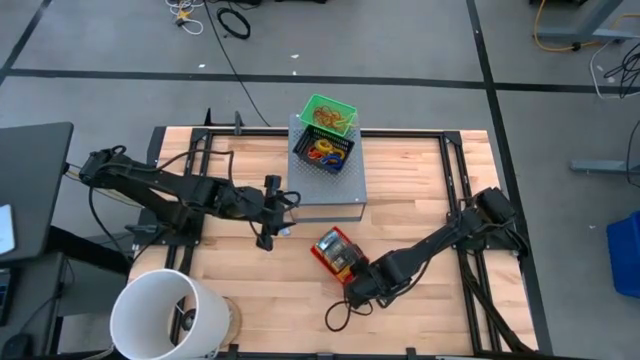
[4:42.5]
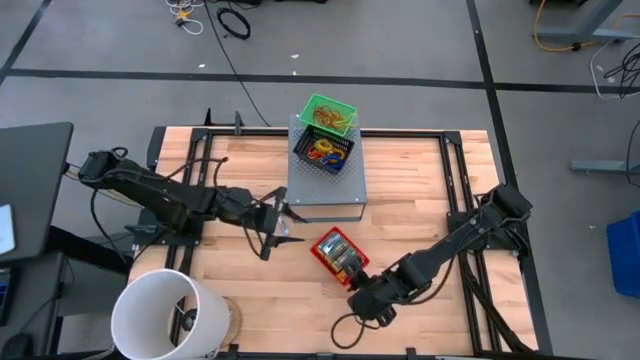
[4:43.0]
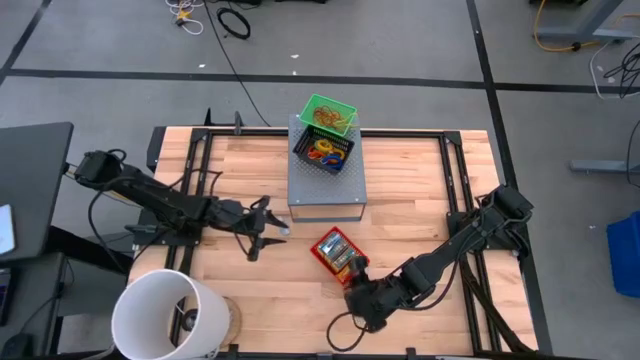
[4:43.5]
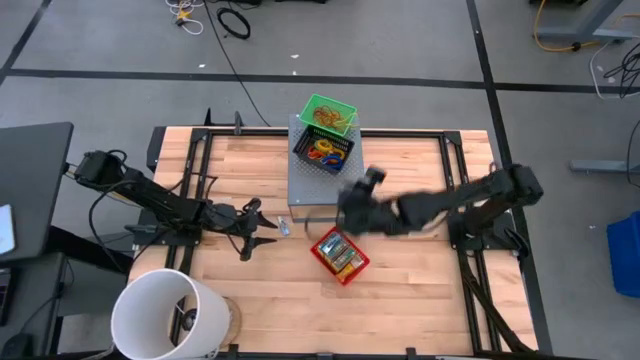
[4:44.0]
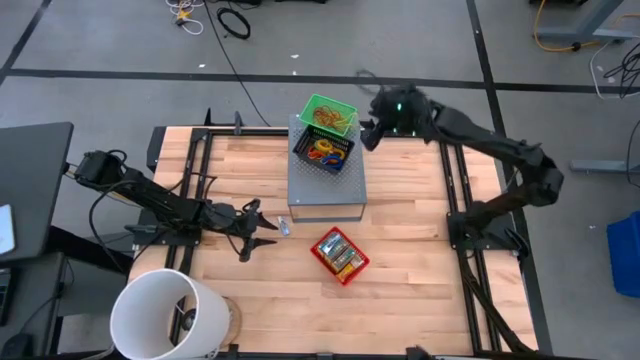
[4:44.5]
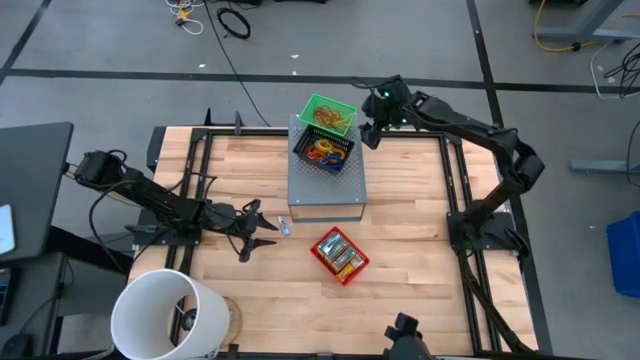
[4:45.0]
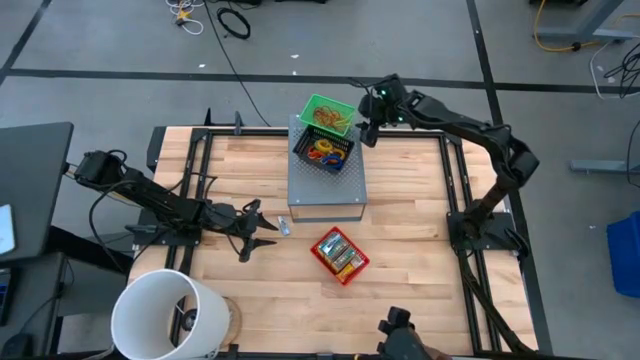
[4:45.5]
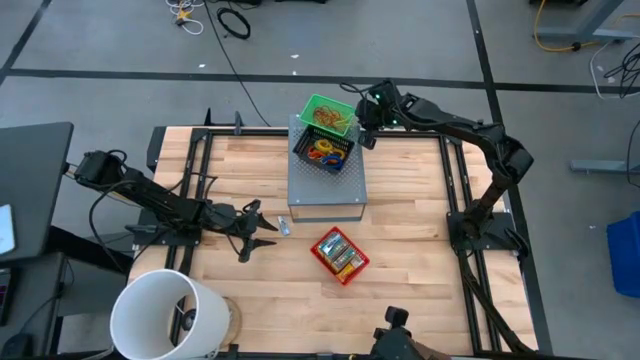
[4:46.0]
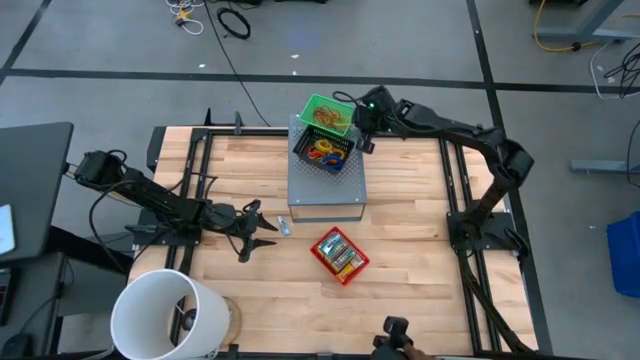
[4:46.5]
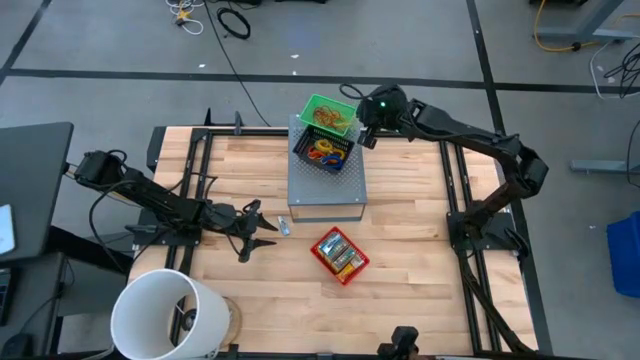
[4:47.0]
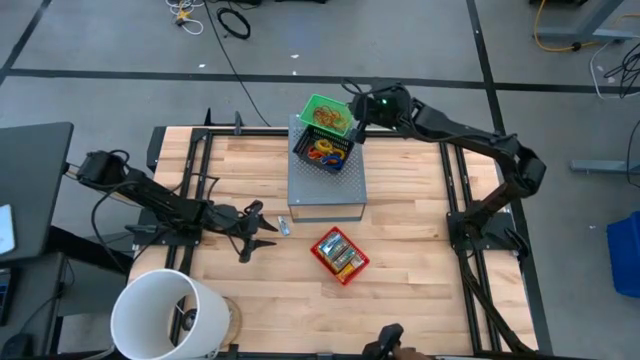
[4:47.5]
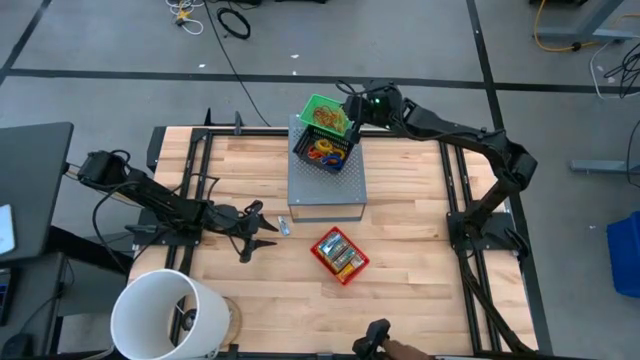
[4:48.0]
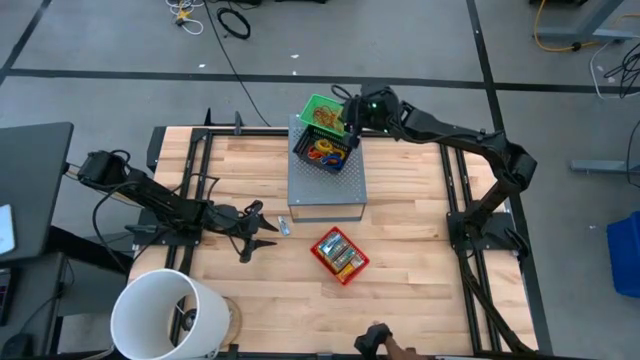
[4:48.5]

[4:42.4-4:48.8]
Task: Pick & Place Office Desk Supplies
Adjust the yellow rubber band in the green basket on the shelf

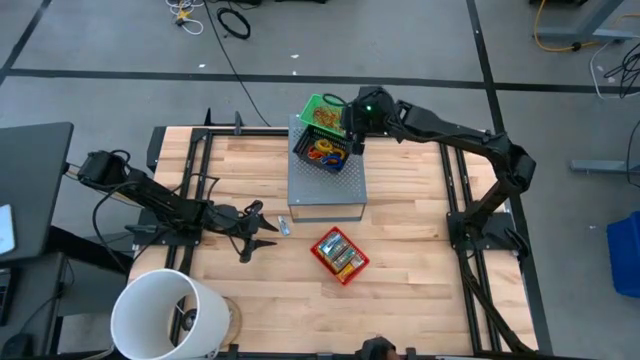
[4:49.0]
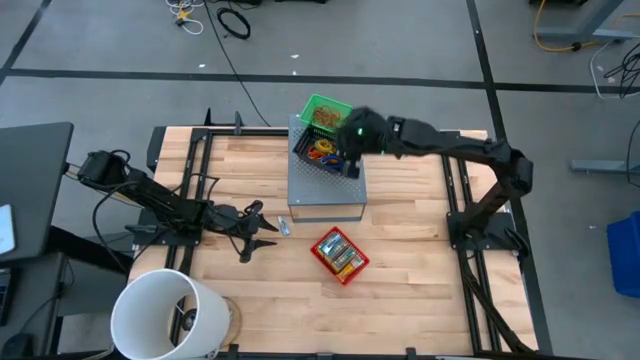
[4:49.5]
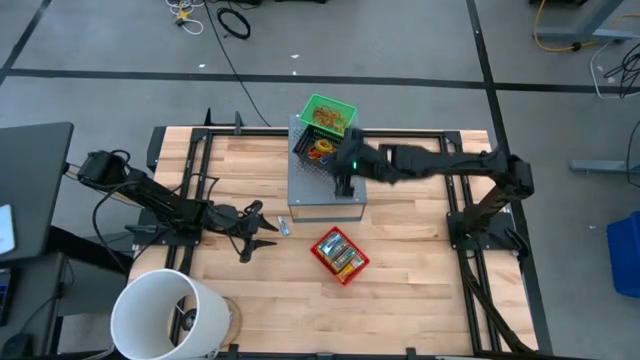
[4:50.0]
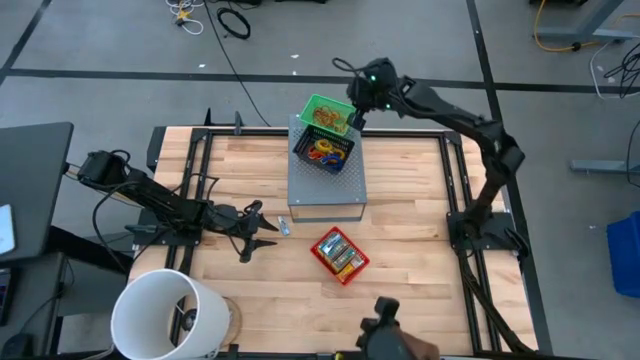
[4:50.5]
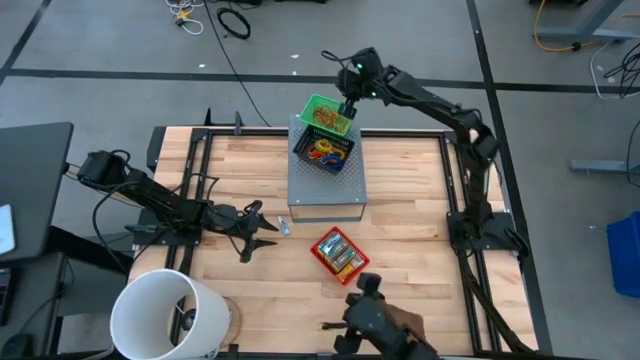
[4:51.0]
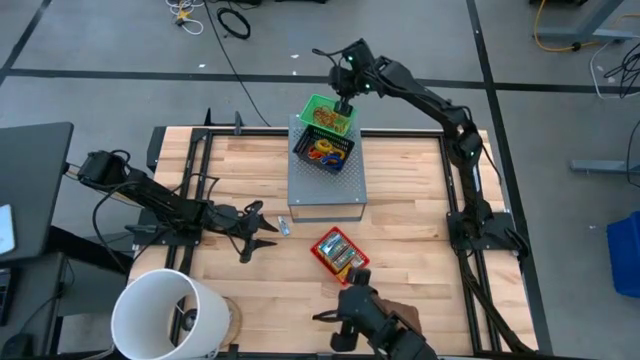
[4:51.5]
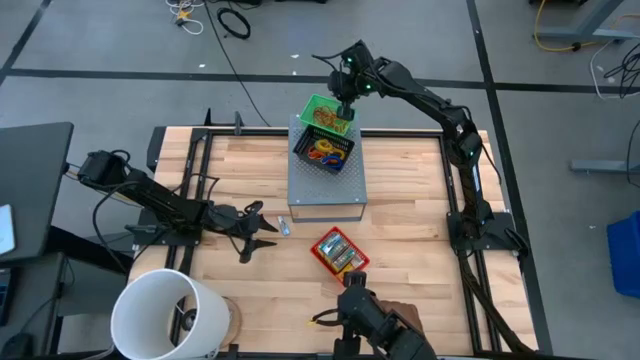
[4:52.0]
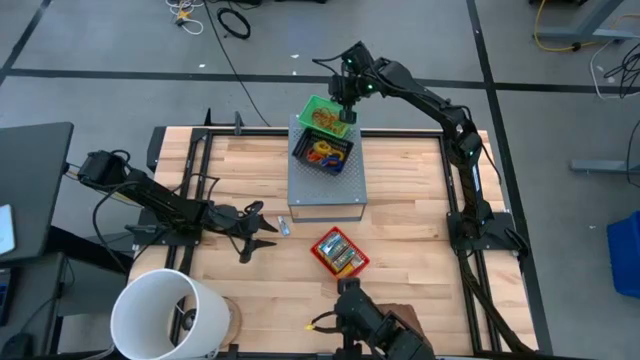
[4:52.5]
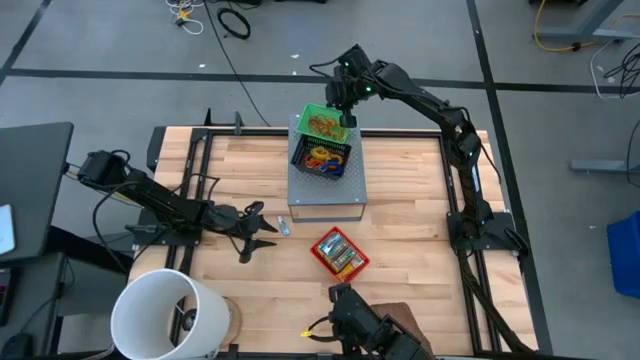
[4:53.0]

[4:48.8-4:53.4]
Adjust the green basket on the shelf

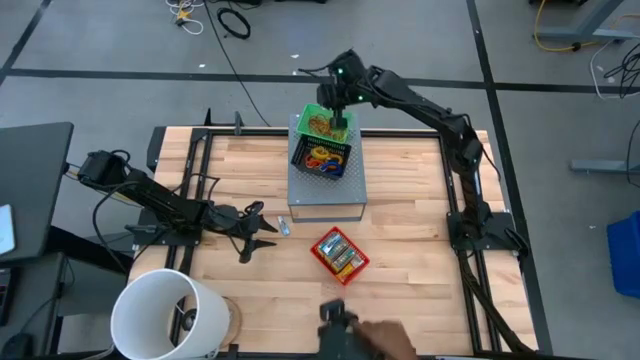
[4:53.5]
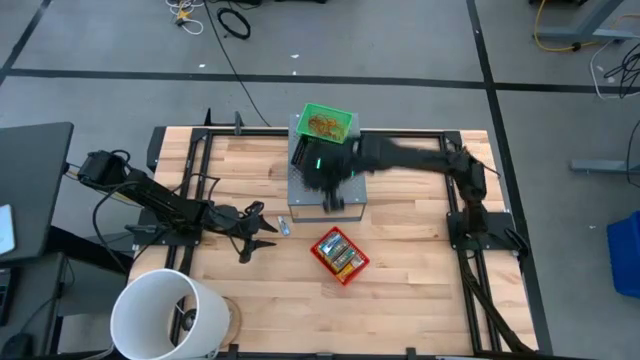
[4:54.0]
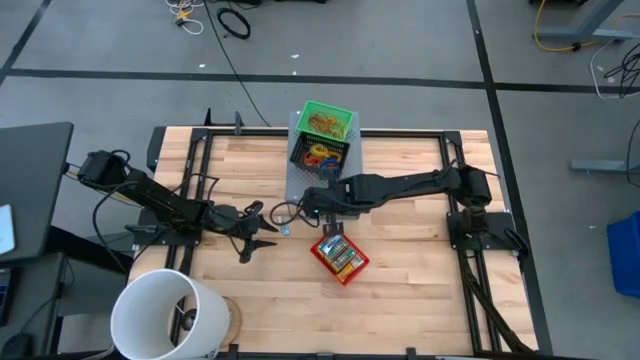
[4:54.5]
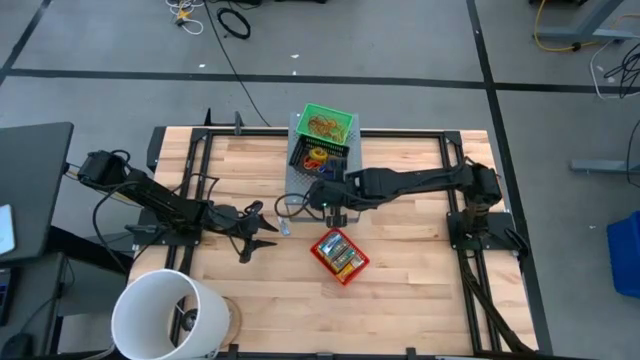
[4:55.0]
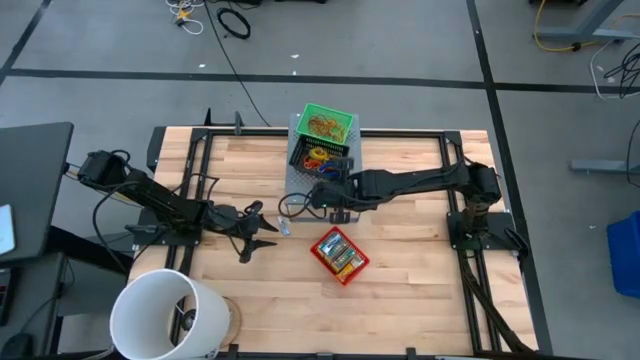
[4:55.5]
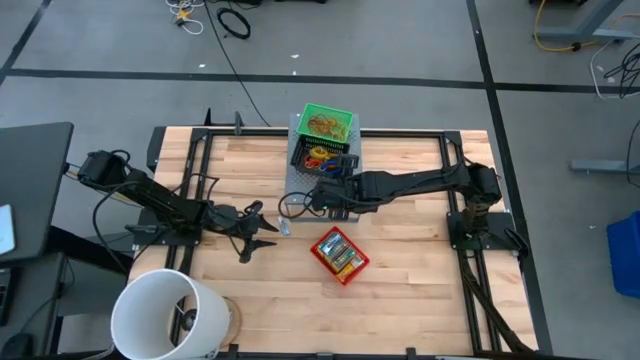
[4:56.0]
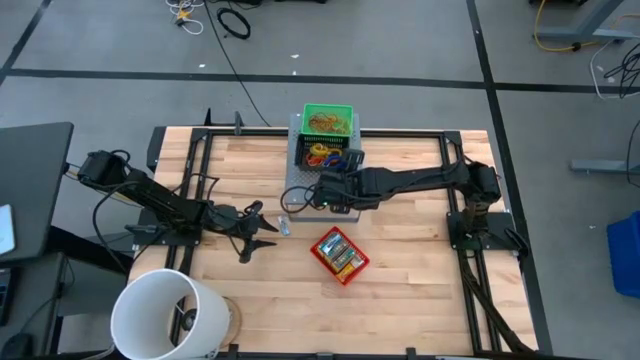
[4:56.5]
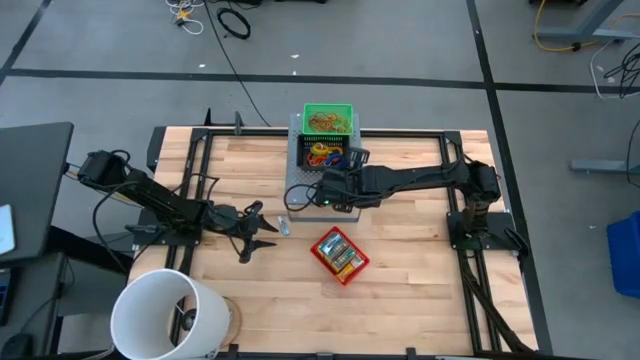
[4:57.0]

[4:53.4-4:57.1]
Adjust the black basket on the shelf

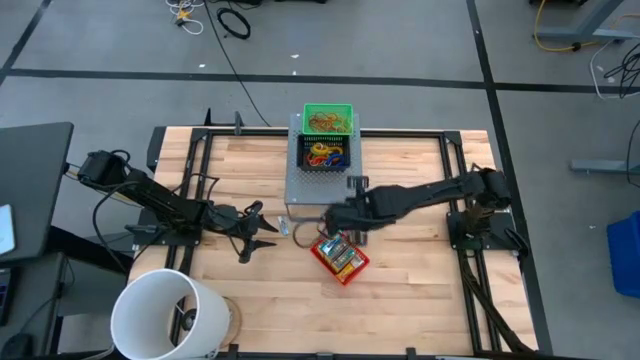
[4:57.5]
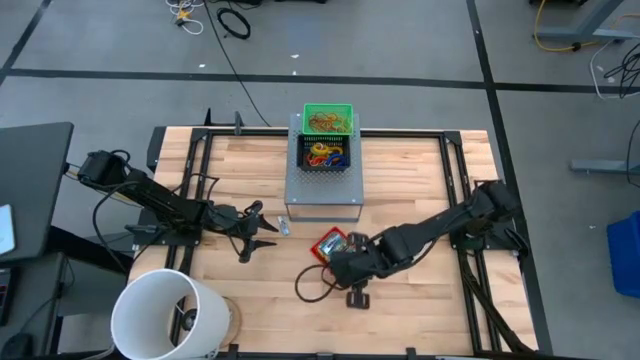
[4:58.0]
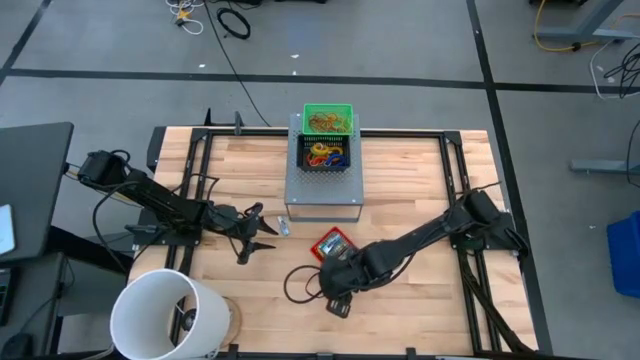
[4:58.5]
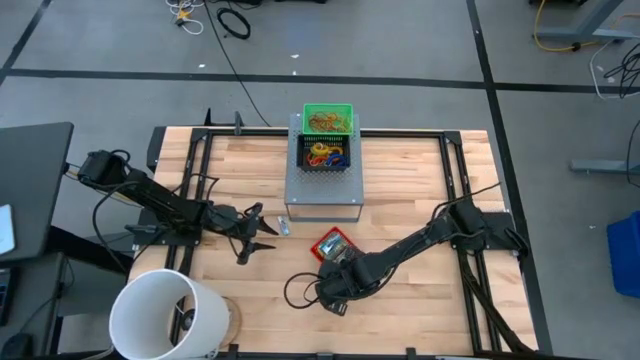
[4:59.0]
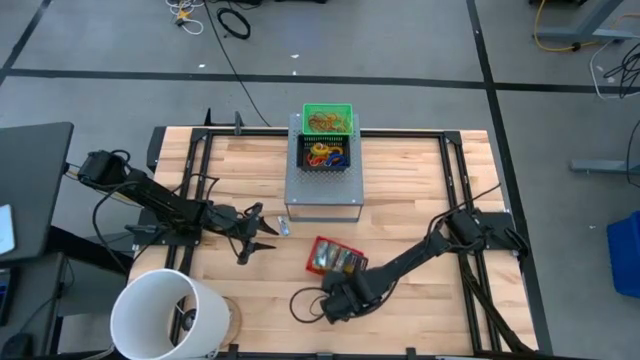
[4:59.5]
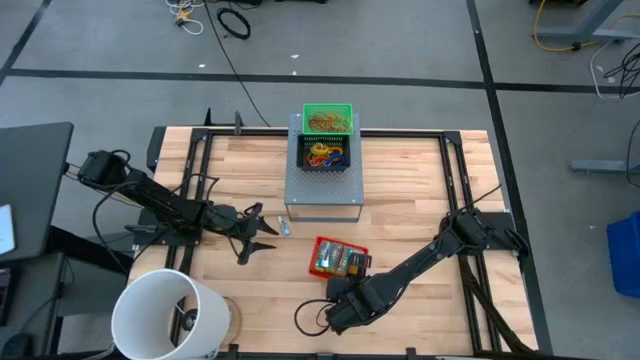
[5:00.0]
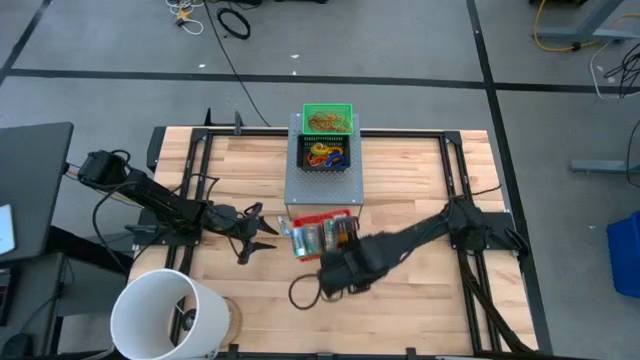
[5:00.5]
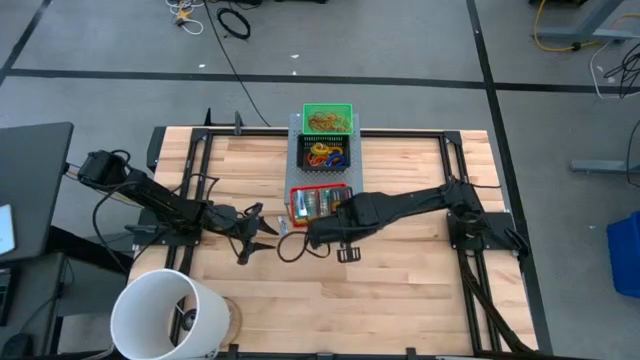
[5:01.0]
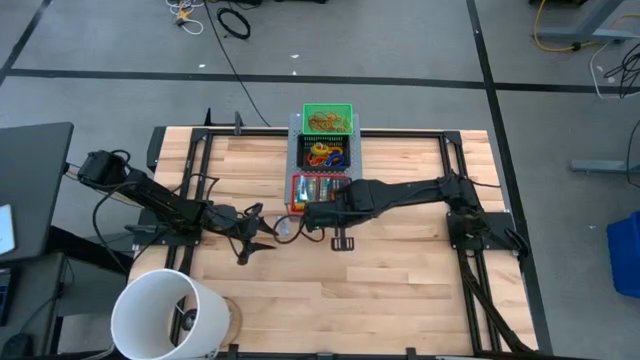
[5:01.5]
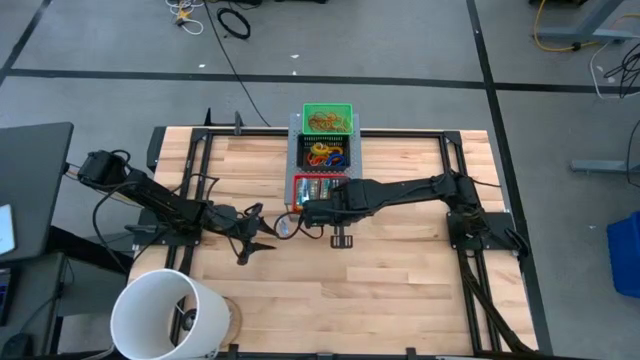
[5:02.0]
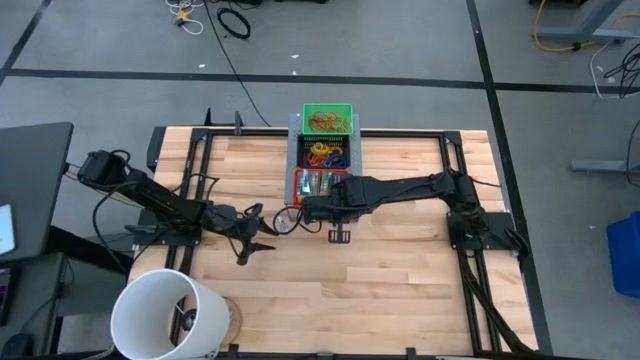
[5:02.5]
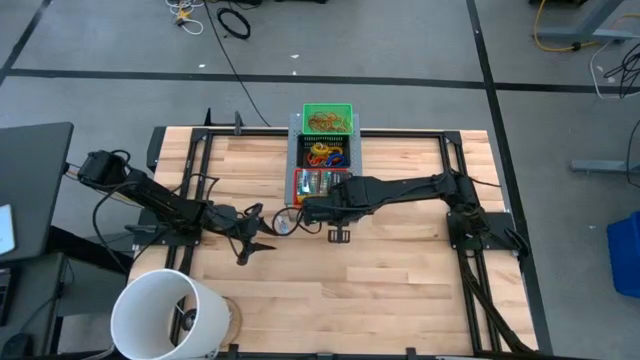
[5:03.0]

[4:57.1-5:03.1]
Put the red basket on the shelf

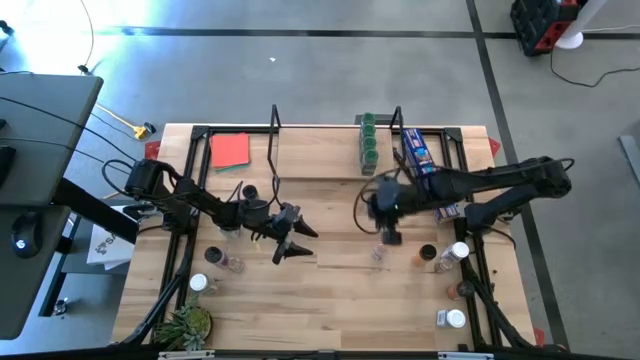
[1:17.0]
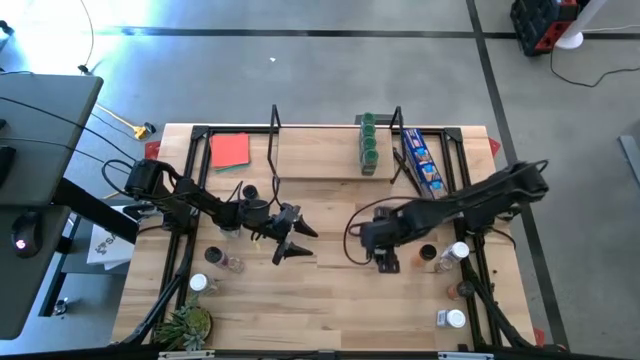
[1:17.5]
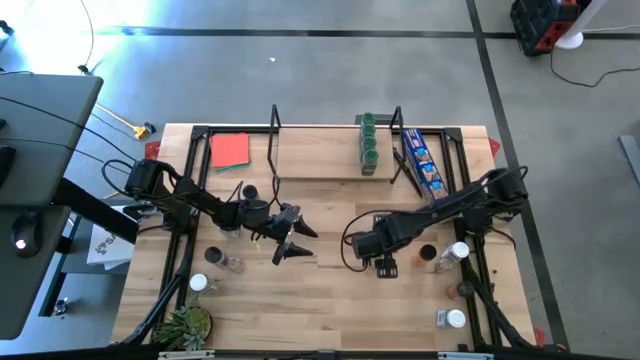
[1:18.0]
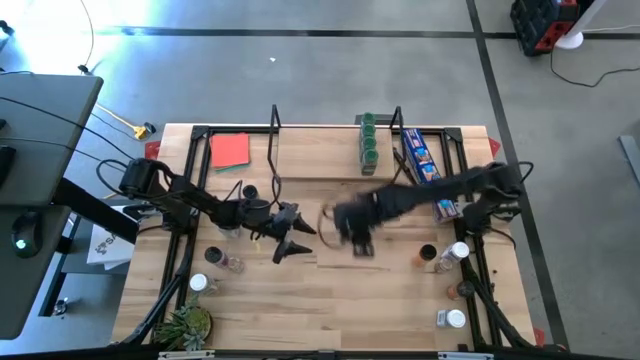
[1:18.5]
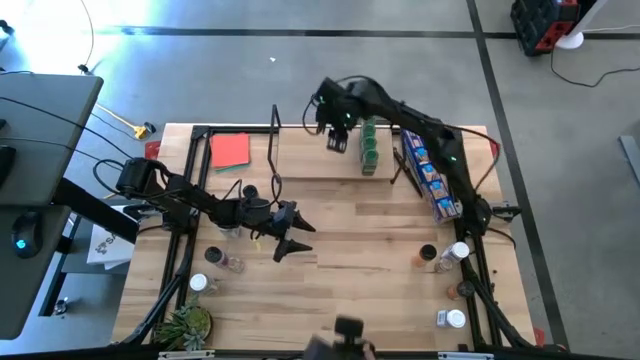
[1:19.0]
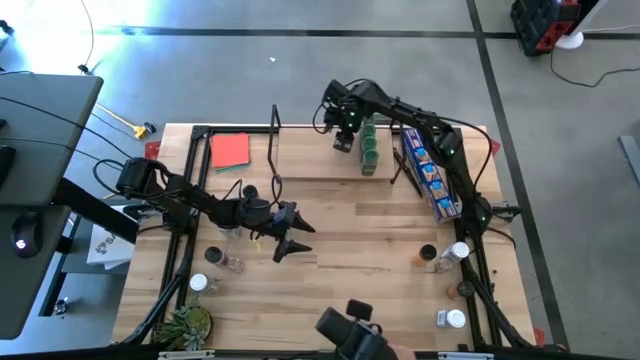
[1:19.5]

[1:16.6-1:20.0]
Task: Shelf spices
Put the transparent seasoning bottle on the shelf
